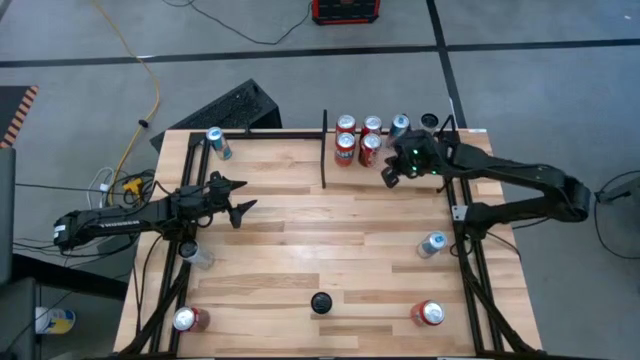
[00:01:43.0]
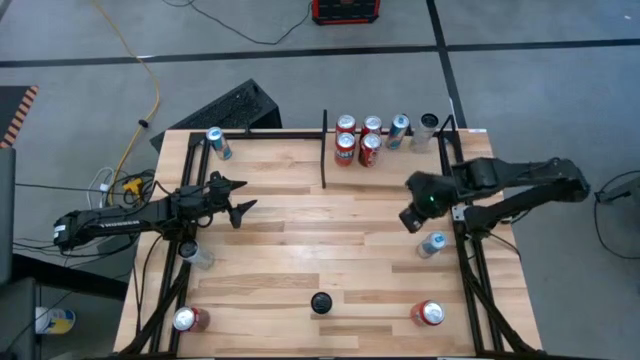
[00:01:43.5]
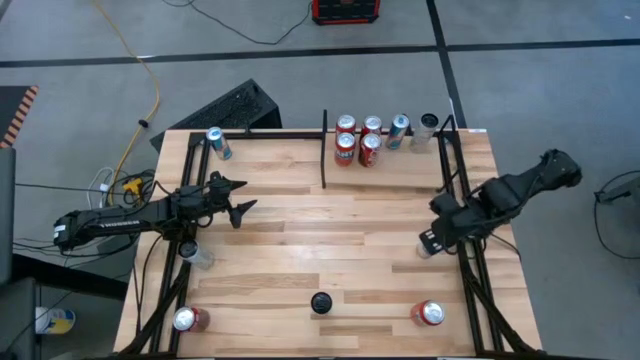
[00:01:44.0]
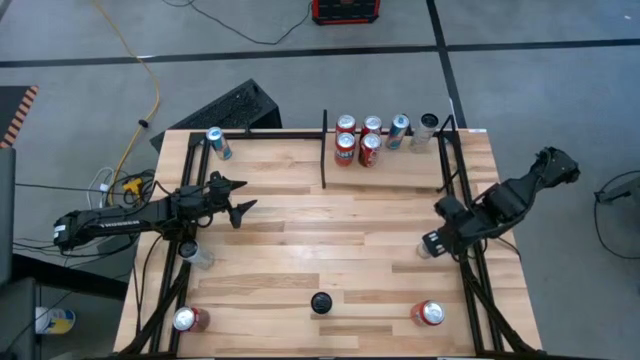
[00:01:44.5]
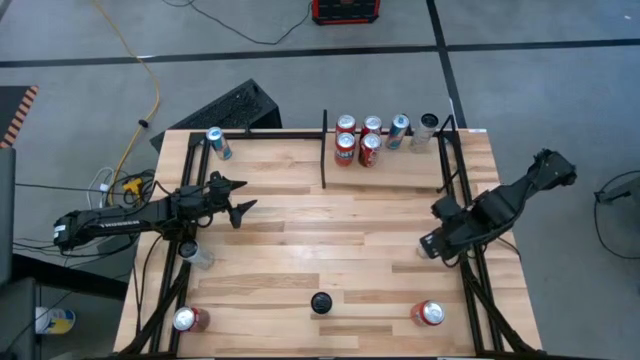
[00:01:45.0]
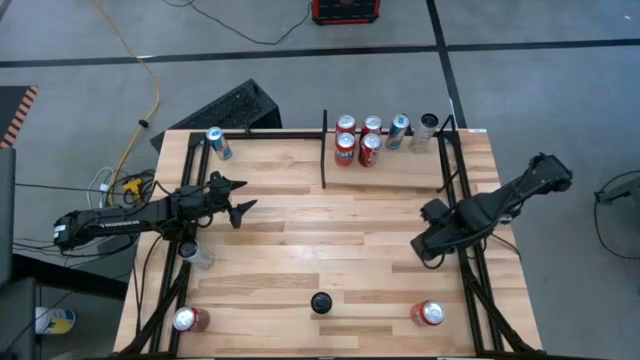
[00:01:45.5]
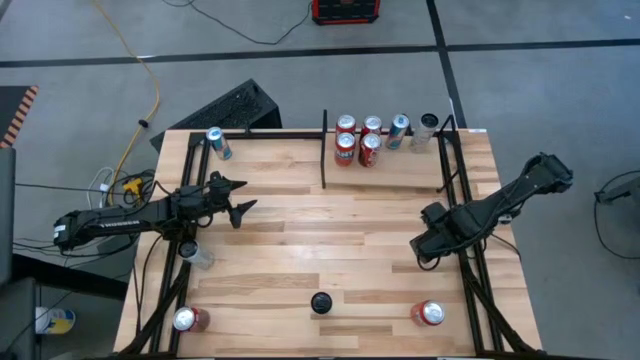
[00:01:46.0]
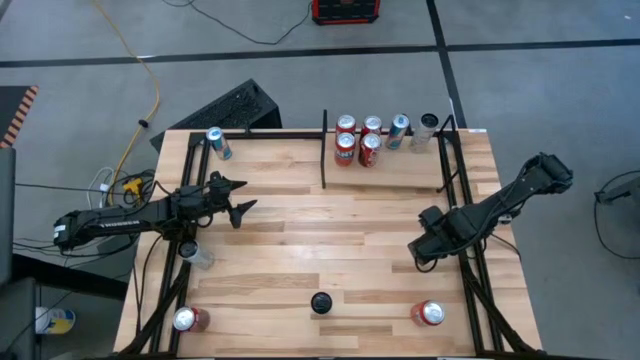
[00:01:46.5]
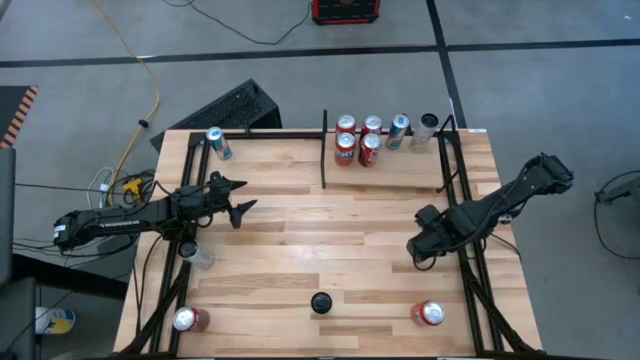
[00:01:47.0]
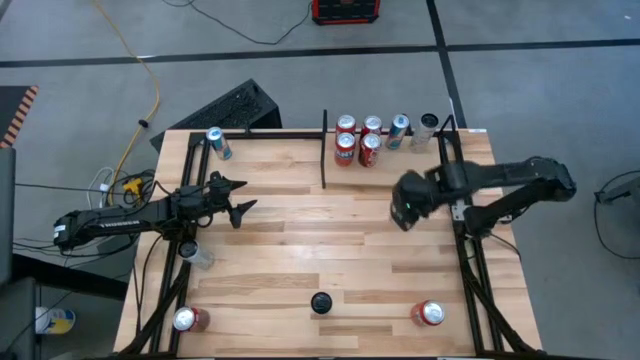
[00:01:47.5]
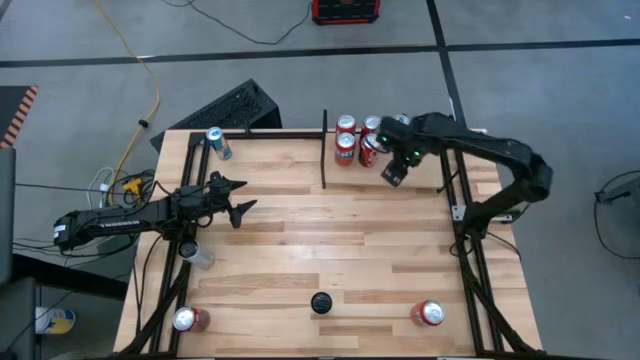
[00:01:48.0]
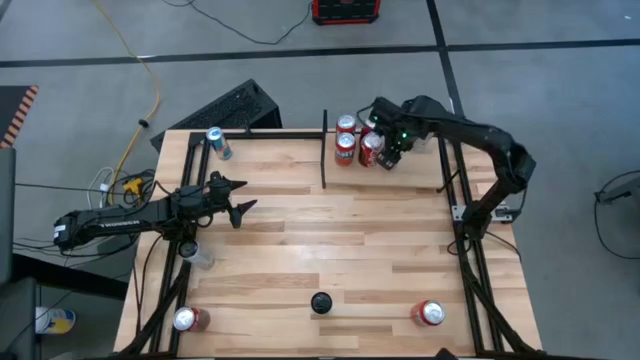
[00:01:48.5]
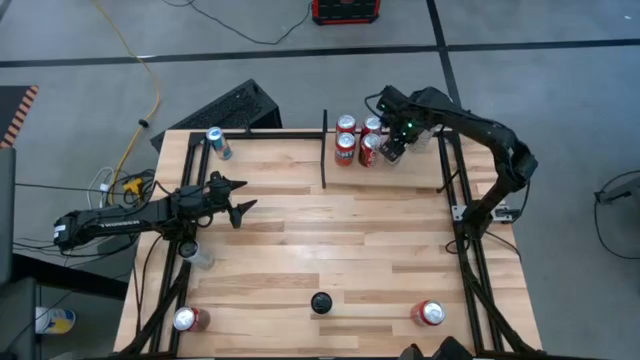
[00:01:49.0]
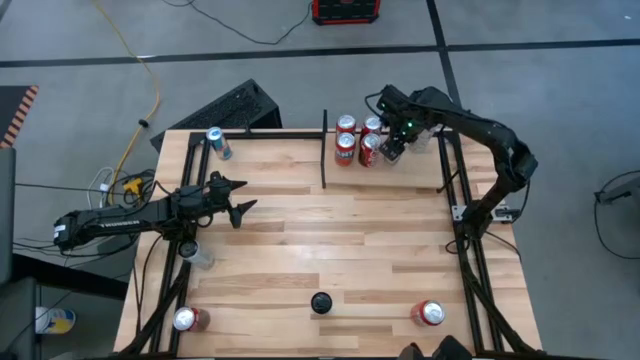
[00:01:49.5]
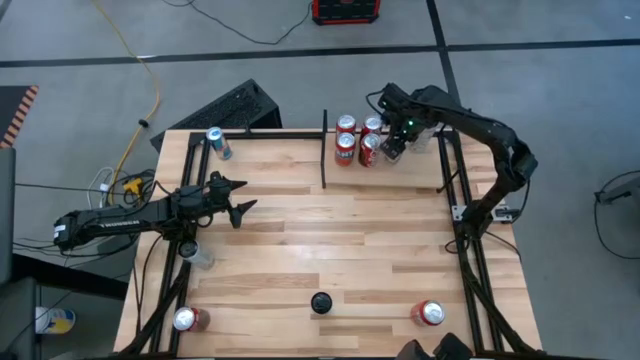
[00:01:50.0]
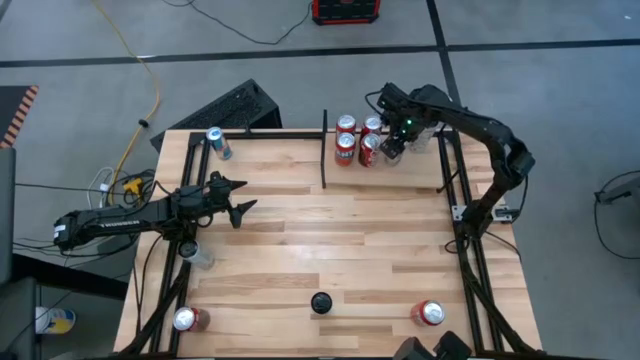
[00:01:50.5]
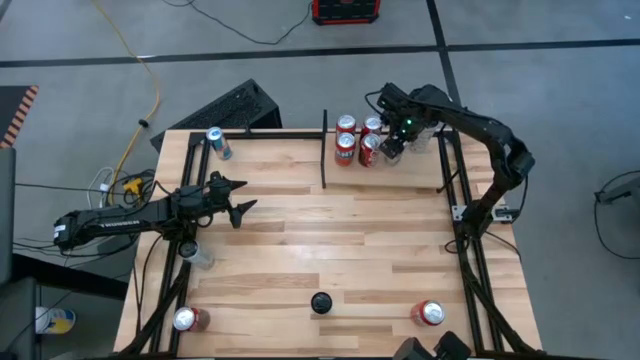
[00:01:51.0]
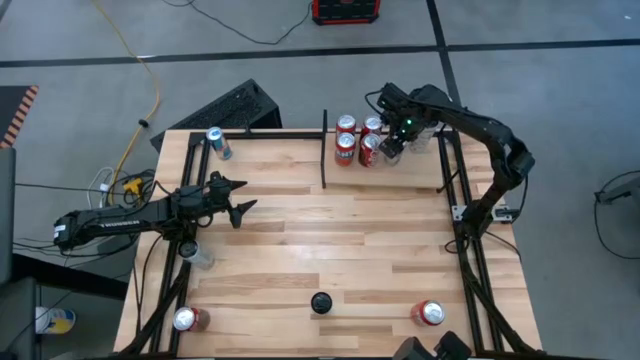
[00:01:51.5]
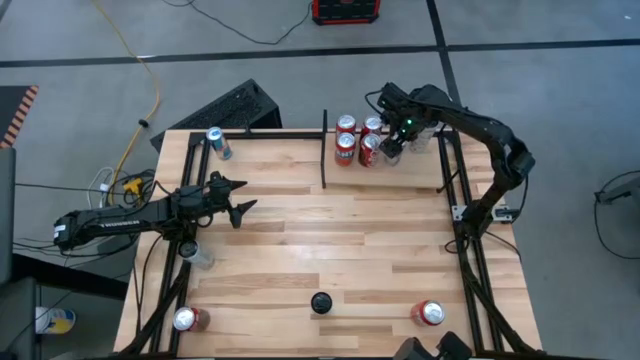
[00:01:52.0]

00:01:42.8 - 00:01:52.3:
Task: Place canned beverage on shelf
Put the bottom blue soda can on the shelf aligned with the other blue soda can

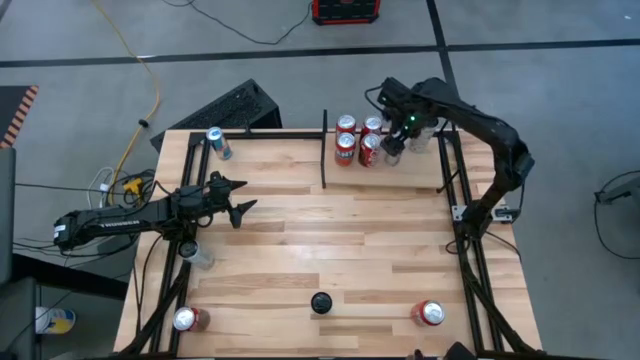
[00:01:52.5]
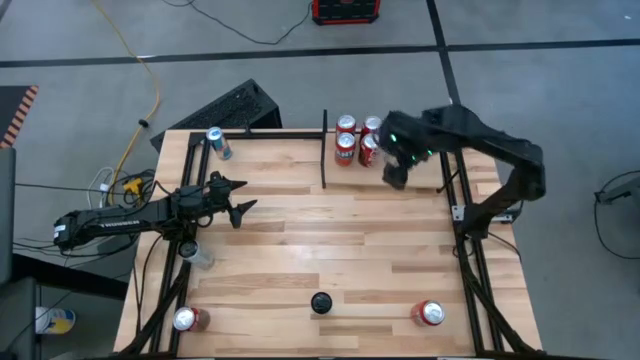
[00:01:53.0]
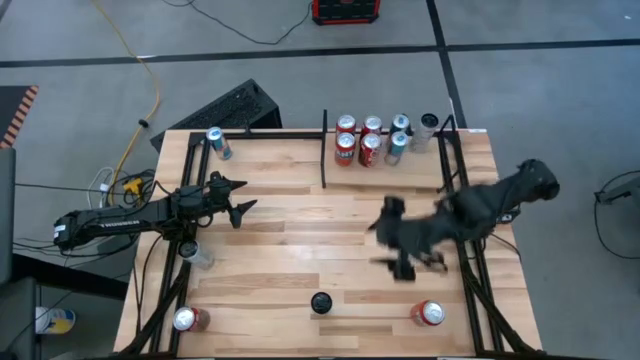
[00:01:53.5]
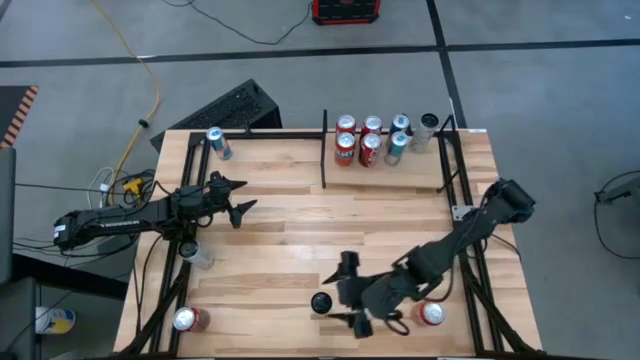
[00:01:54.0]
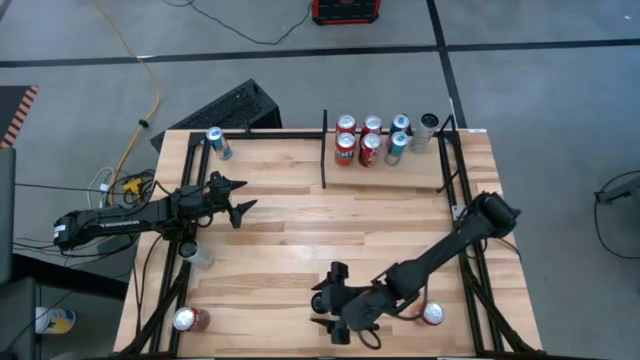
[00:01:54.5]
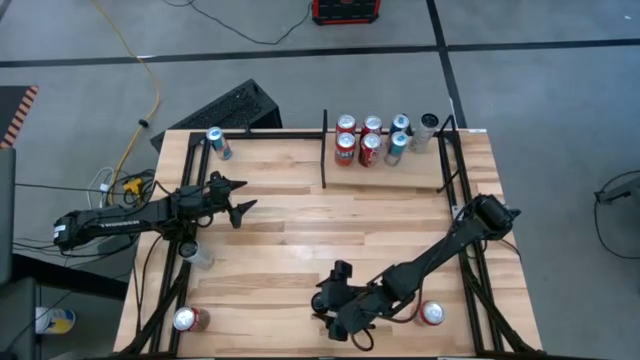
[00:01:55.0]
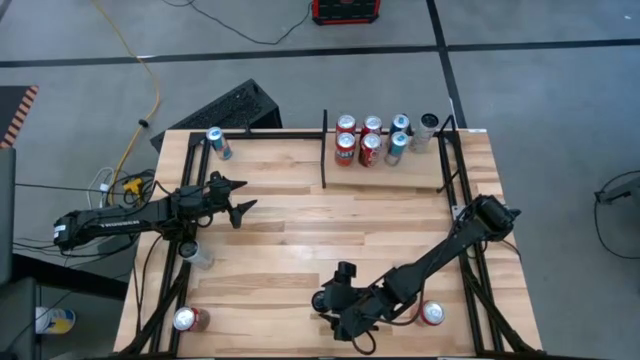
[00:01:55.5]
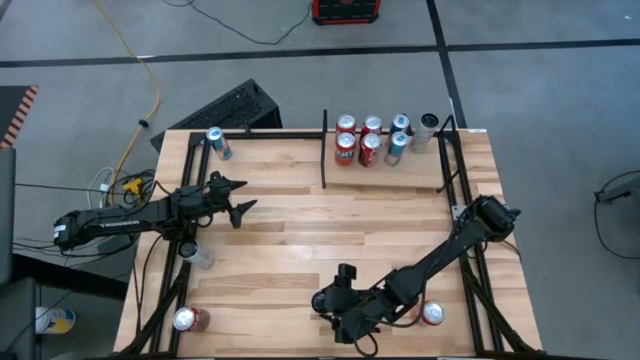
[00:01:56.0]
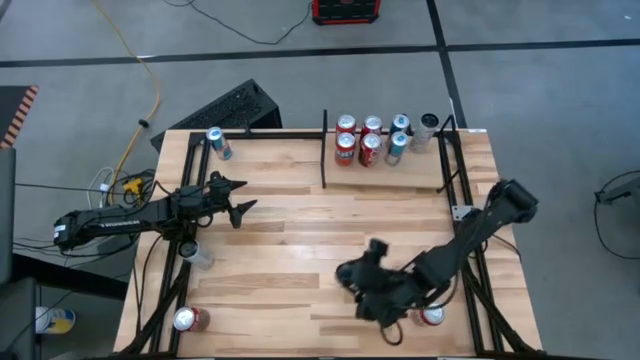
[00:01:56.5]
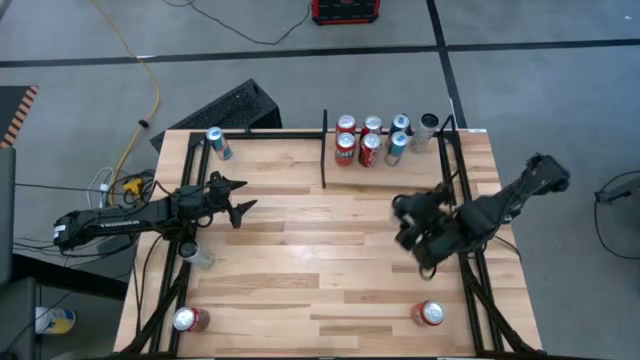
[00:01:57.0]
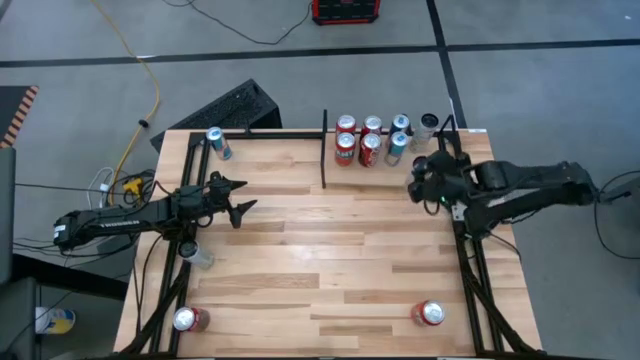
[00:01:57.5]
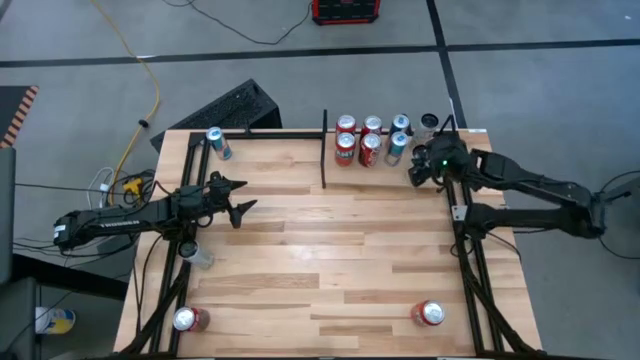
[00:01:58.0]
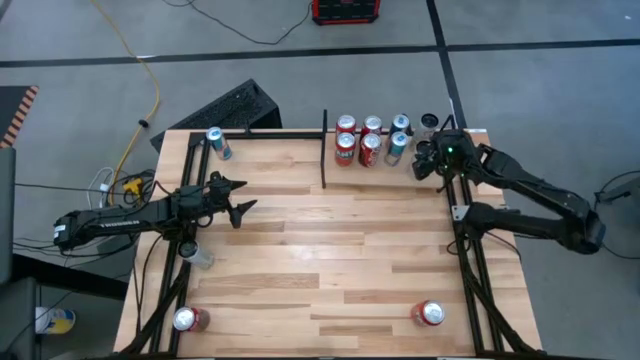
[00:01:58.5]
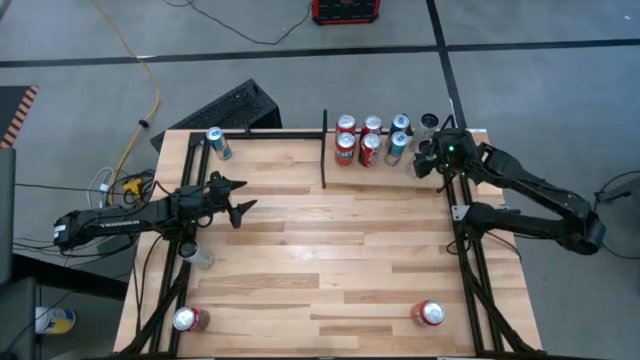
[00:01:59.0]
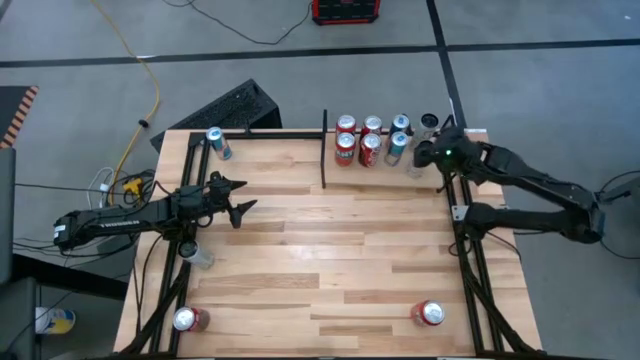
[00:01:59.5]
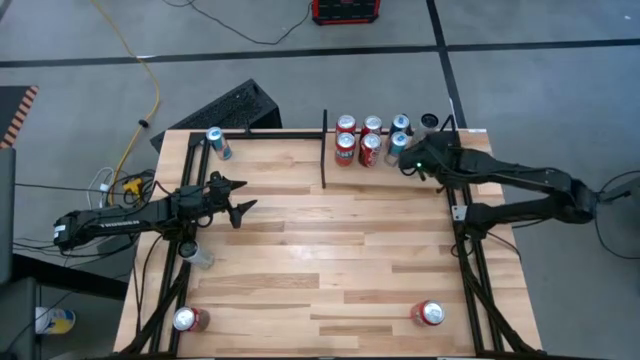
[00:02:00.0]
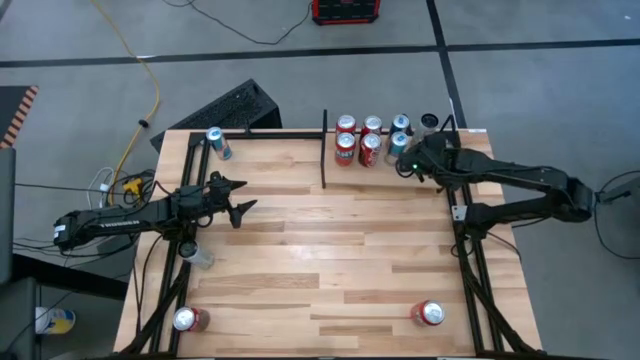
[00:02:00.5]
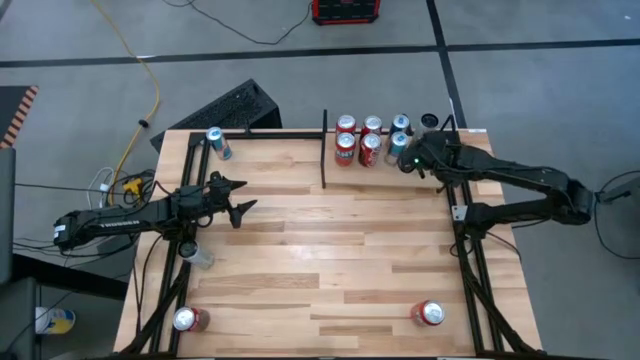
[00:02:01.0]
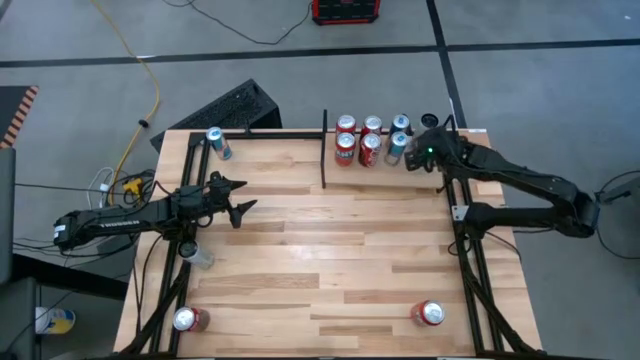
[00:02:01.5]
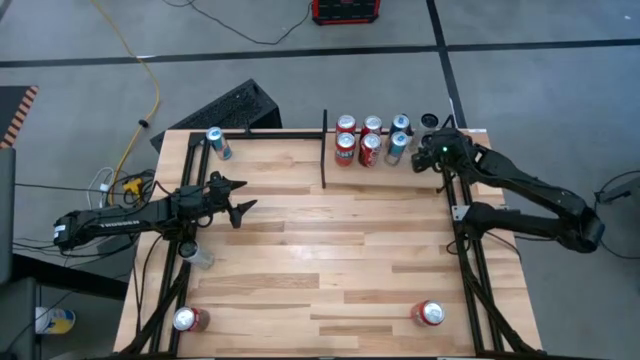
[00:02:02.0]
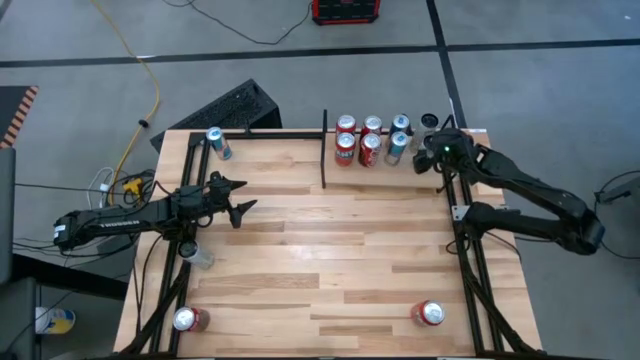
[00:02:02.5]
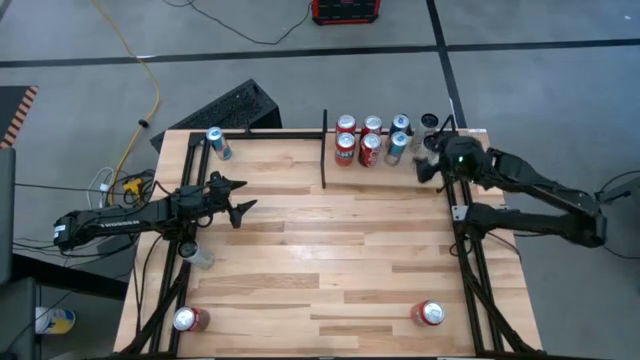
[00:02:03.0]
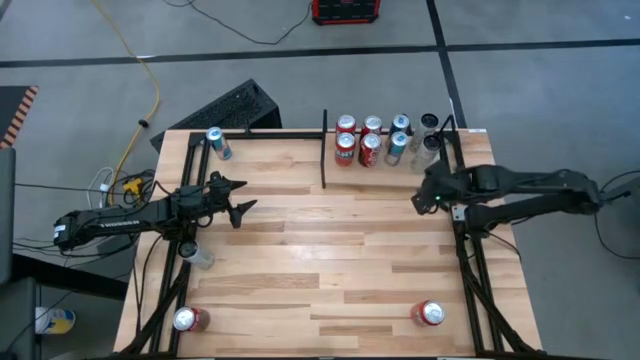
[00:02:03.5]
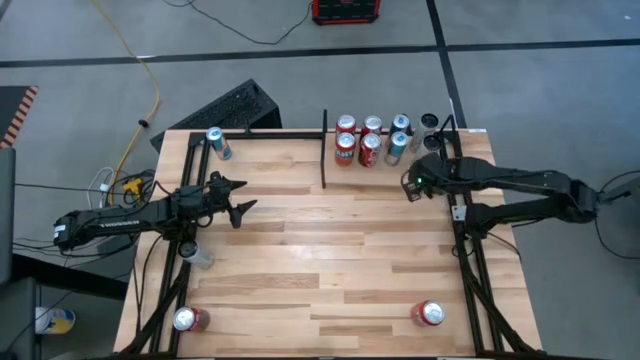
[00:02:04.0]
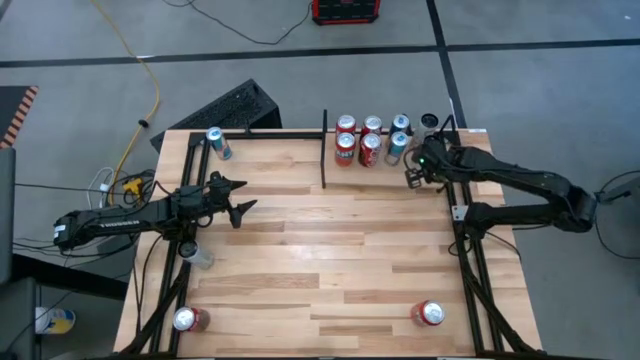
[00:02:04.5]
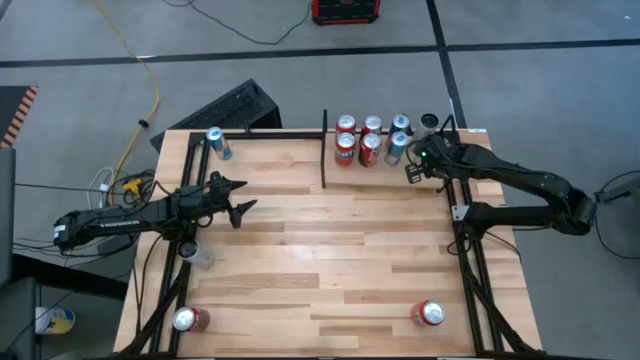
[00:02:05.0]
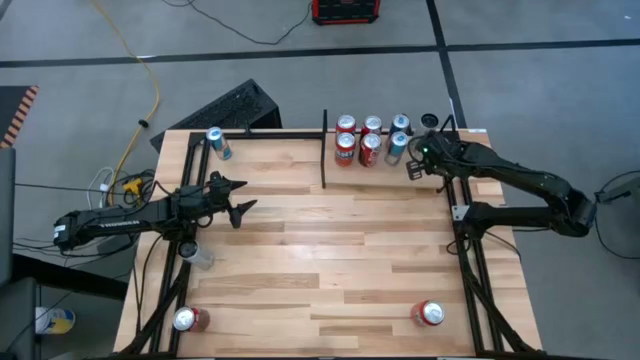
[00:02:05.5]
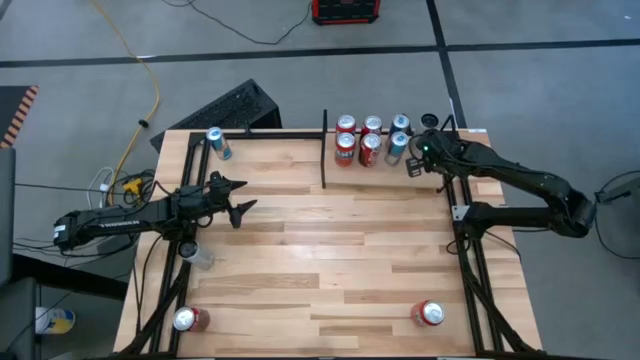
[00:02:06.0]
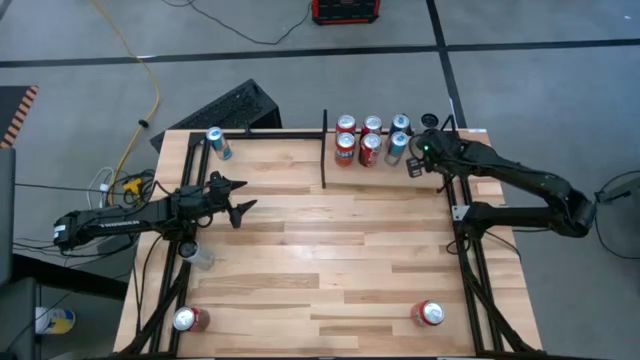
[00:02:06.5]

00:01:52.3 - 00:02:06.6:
Put the bottom white-yellow soda can on the shelf aligned with the other soda can
